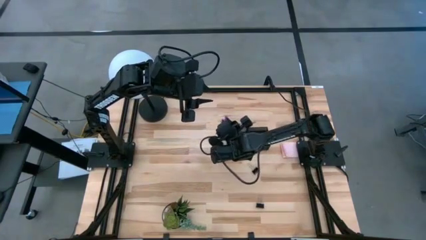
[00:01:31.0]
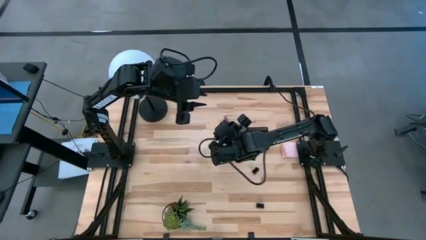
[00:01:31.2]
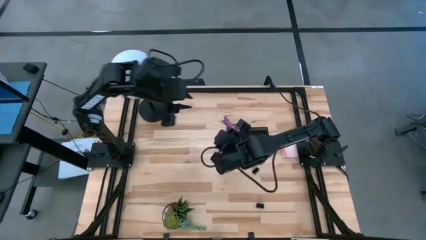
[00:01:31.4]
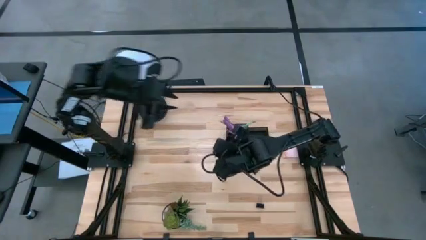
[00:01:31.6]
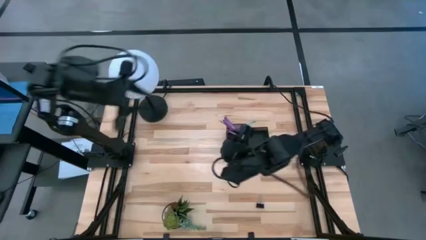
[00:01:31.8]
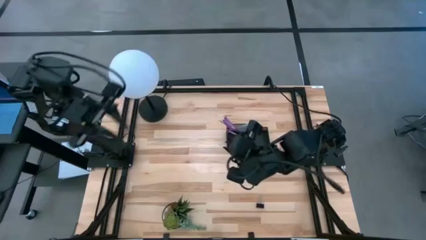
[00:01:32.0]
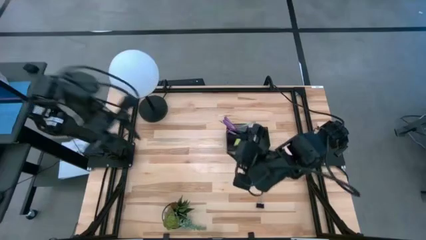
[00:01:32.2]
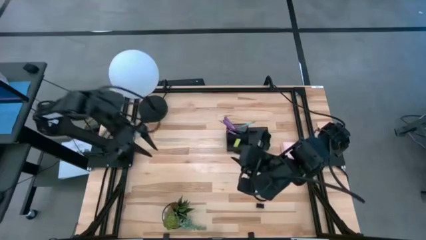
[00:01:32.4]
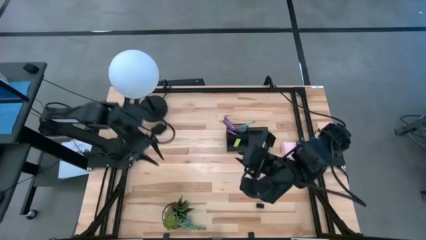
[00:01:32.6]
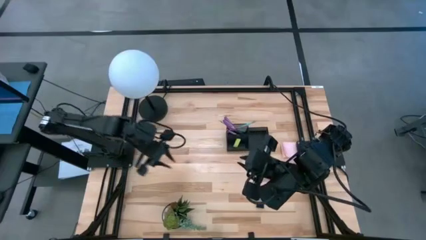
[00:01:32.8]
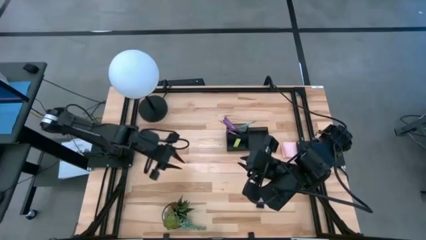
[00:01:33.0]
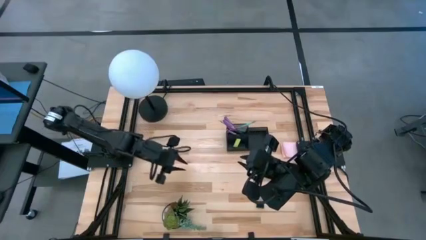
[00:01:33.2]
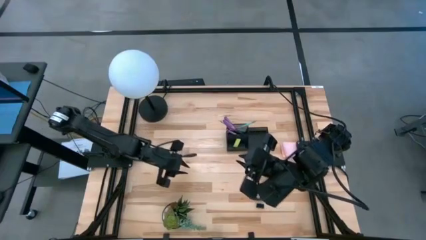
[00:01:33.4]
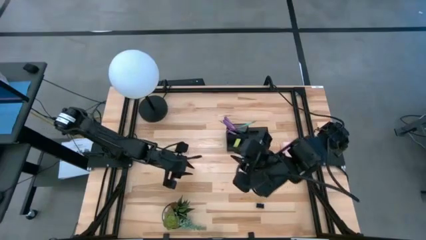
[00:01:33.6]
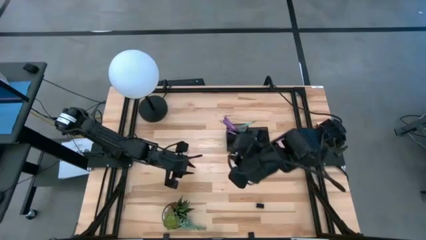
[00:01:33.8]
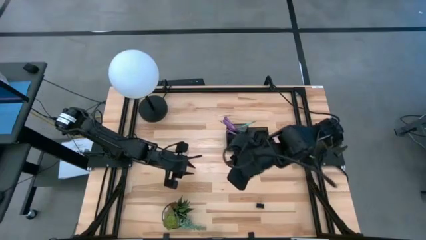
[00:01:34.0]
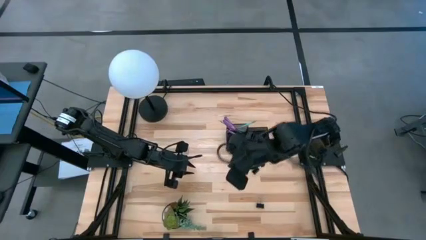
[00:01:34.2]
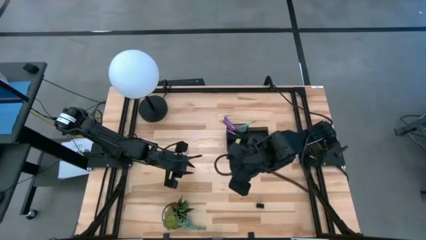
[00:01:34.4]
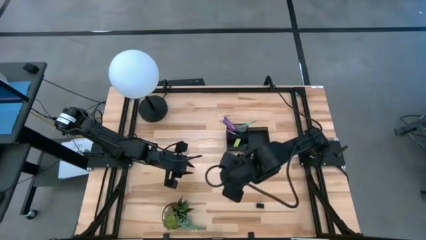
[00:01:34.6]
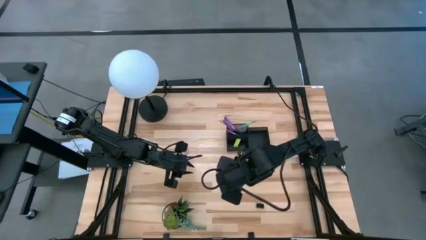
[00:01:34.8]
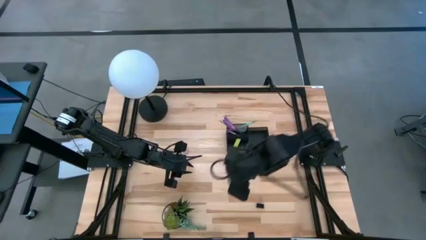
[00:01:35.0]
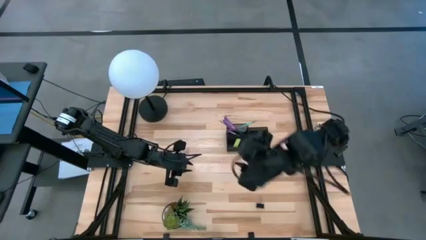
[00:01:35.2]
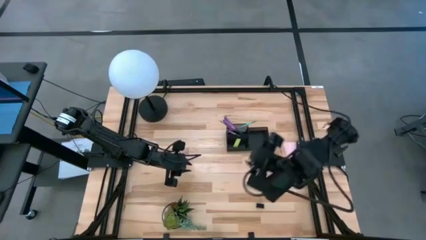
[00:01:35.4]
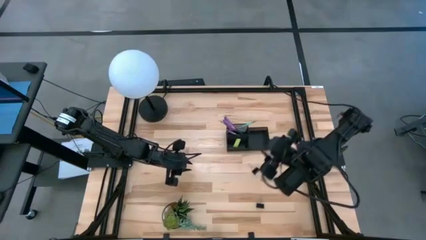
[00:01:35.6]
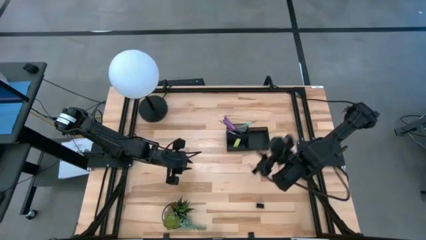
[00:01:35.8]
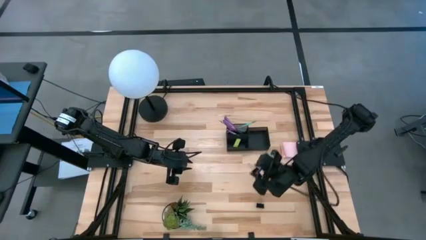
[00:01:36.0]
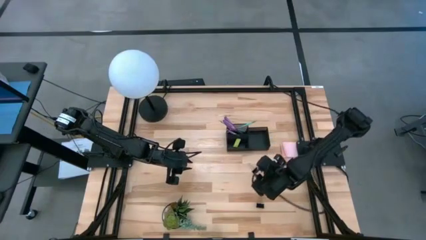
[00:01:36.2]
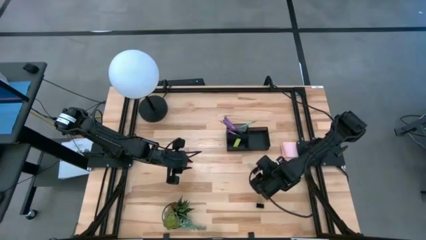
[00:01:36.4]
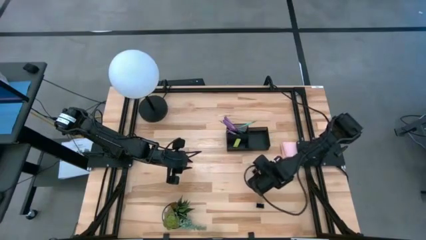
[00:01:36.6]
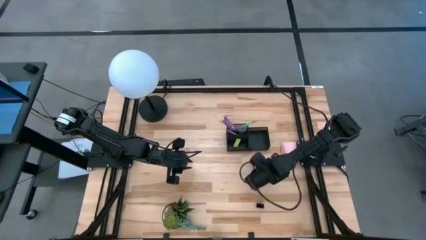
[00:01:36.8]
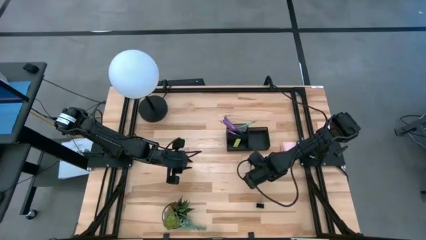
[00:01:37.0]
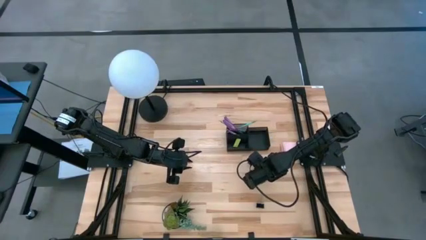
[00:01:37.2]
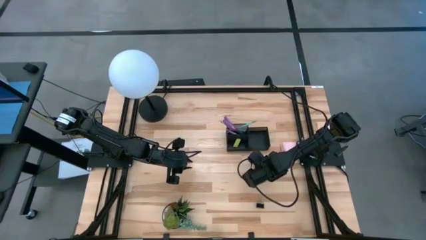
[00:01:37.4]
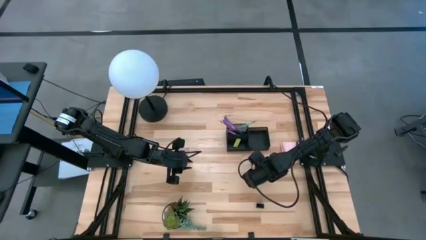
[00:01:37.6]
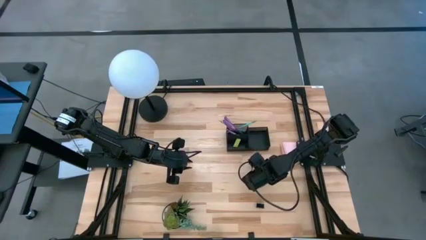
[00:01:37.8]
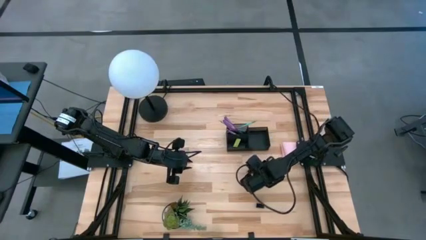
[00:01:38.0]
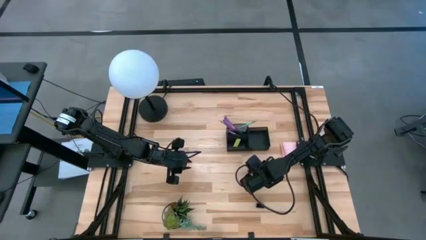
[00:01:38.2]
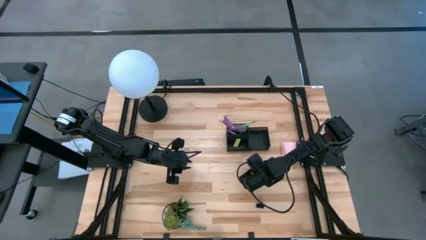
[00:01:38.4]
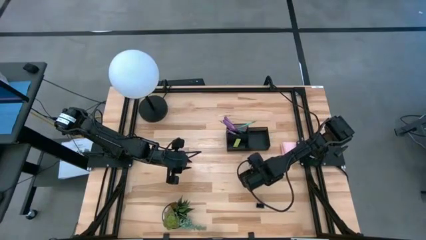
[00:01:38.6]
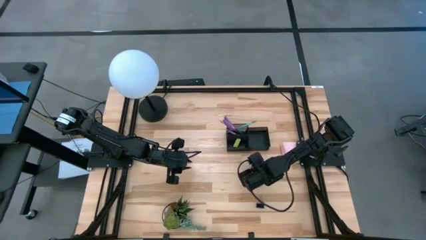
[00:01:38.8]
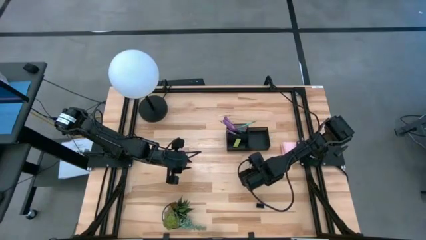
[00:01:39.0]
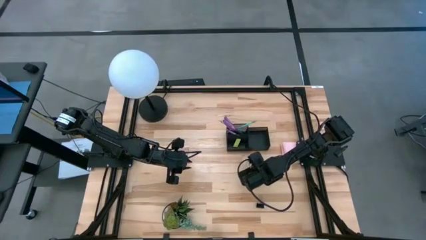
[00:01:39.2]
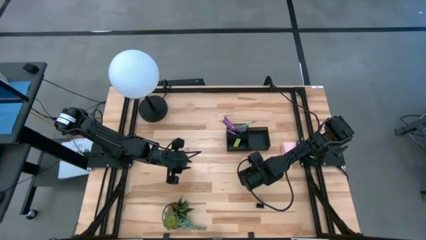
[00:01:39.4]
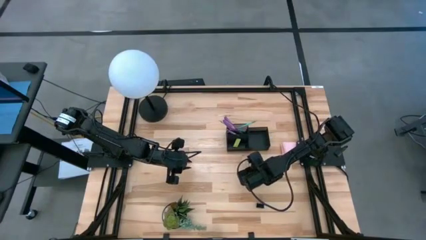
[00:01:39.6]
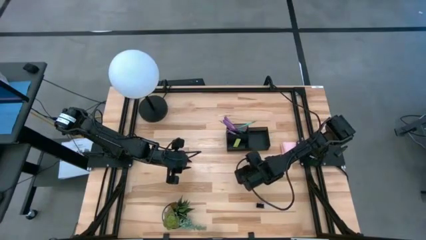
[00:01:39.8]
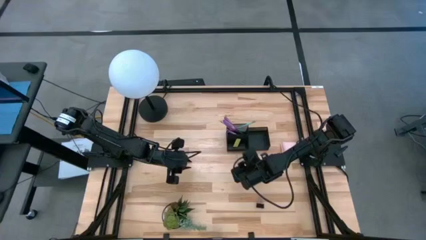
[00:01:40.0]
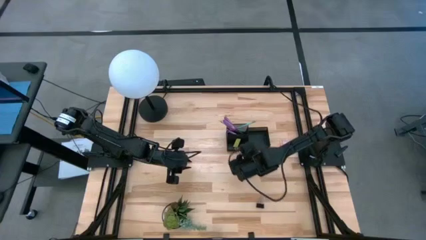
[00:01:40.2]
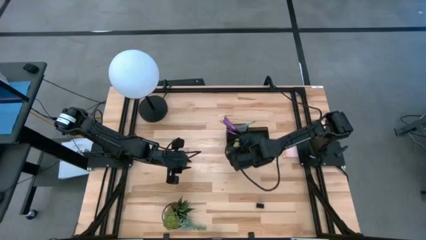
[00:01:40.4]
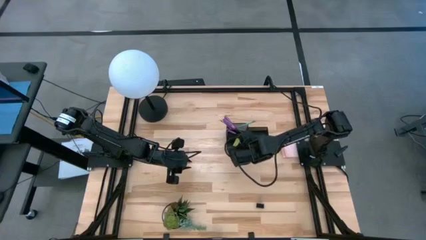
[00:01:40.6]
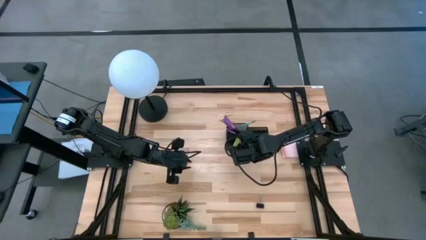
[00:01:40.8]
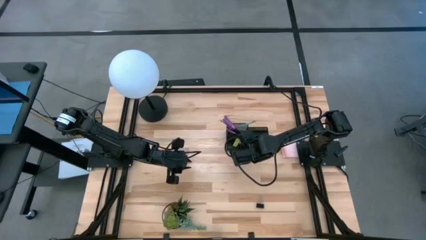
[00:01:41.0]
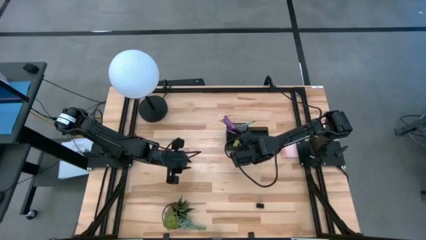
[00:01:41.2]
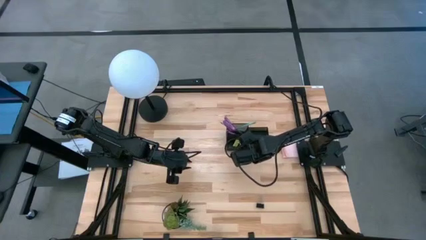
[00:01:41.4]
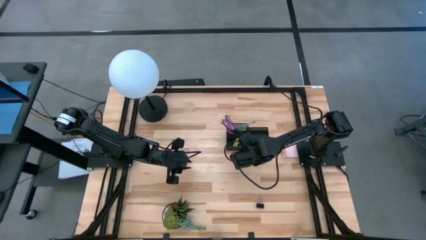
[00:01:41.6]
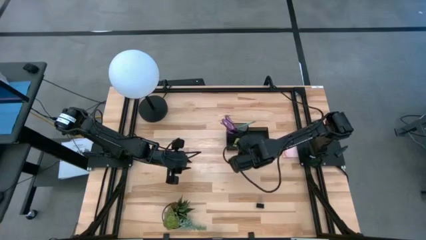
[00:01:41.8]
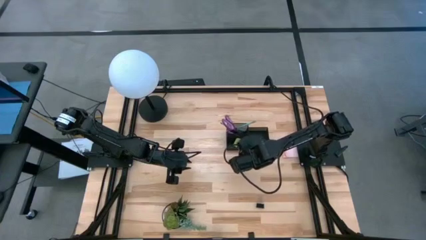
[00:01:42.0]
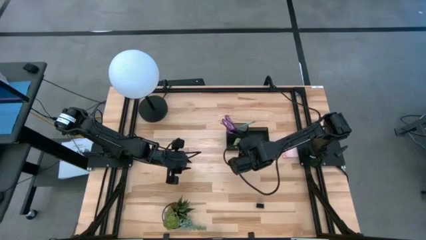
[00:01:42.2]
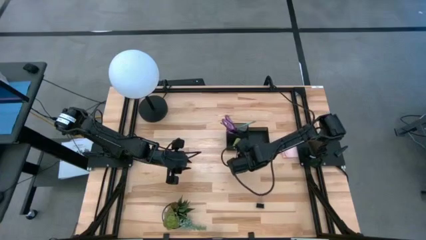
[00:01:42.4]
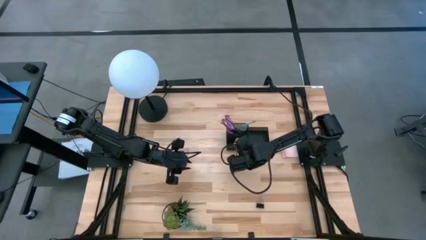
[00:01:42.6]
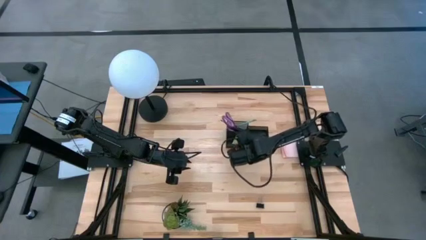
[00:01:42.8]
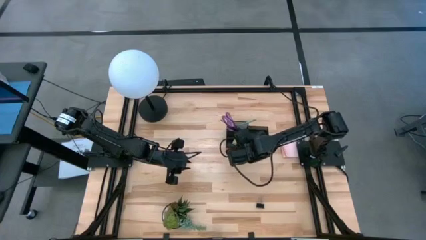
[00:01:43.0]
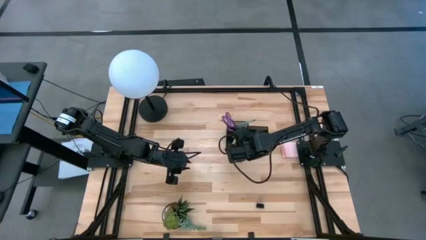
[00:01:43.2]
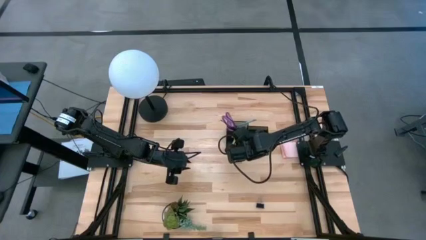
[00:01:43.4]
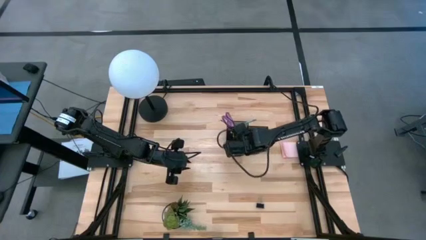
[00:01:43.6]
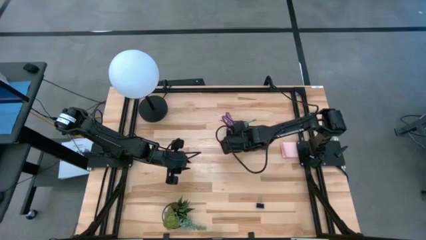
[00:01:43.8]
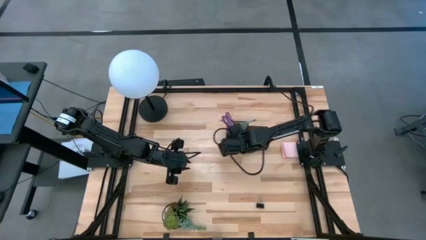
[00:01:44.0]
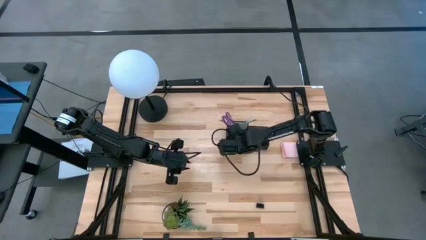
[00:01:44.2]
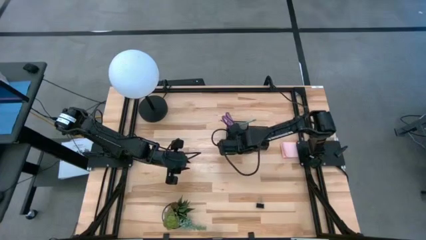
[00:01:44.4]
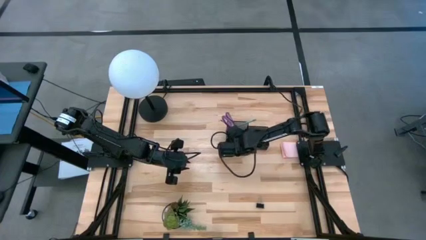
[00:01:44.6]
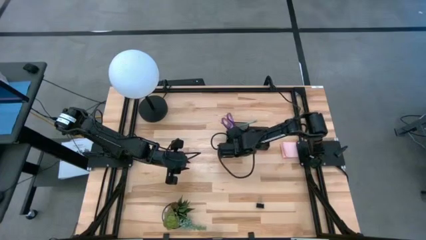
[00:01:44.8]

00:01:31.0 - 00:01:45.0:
Task: Pick and place office supplies into organizer
Put the top black binder clip into the black desk organizer
